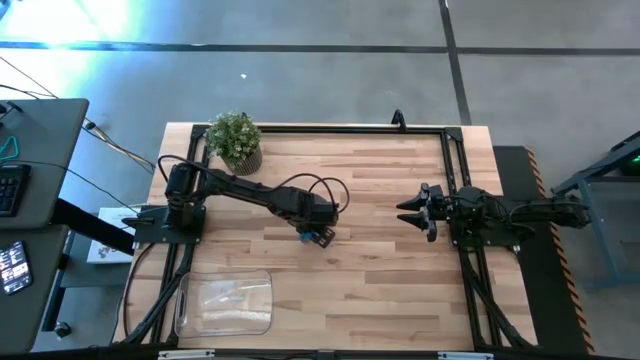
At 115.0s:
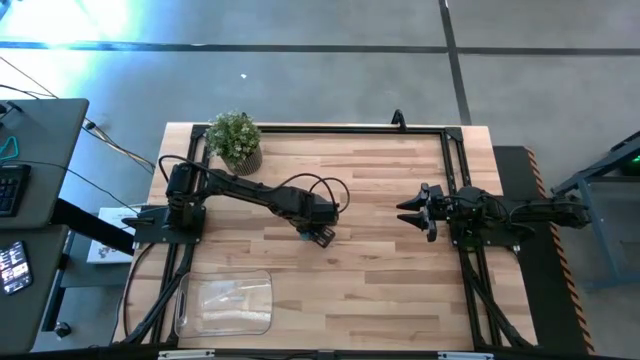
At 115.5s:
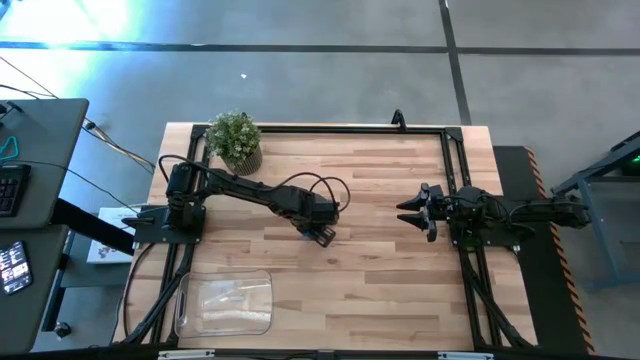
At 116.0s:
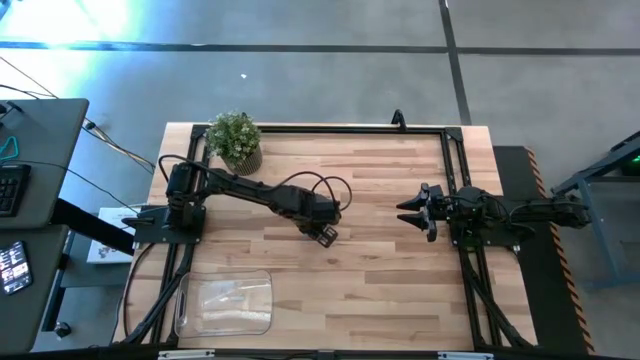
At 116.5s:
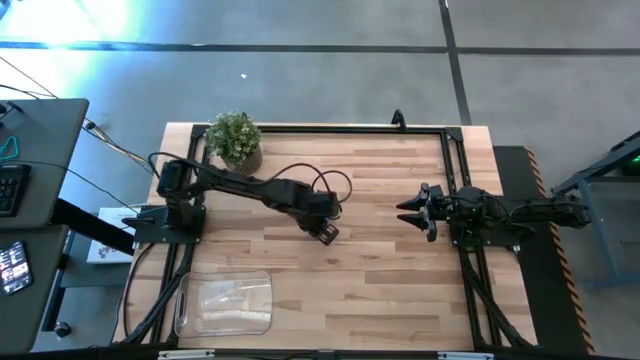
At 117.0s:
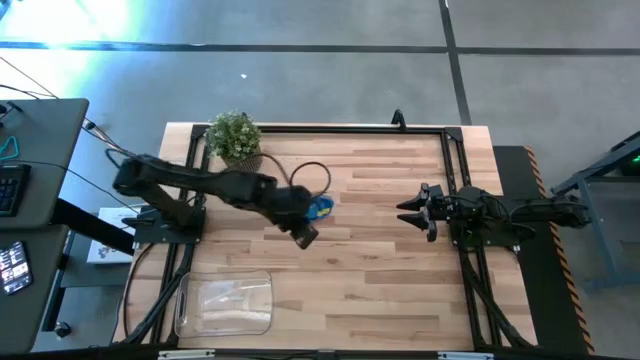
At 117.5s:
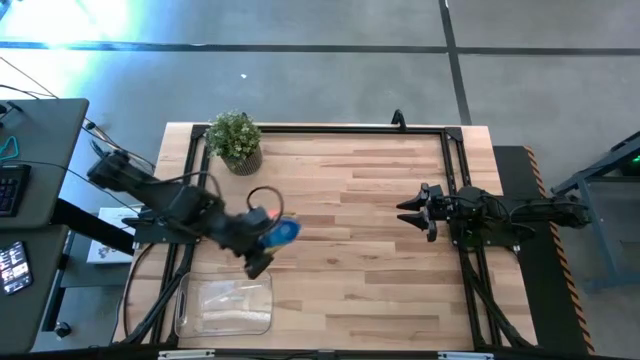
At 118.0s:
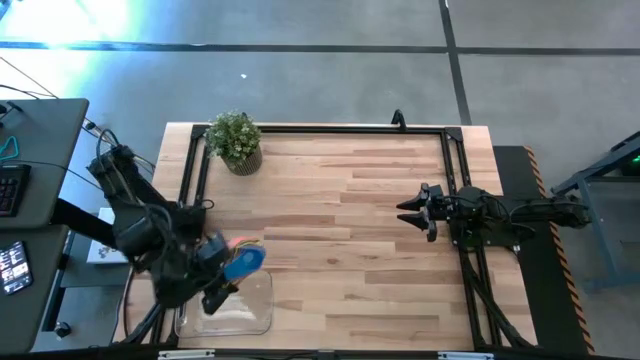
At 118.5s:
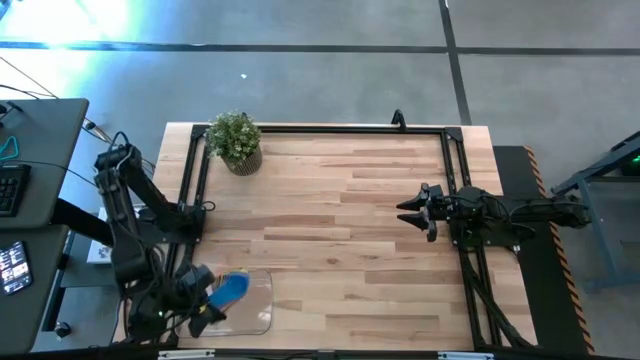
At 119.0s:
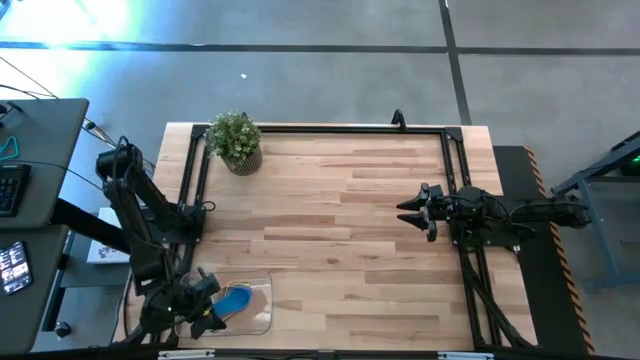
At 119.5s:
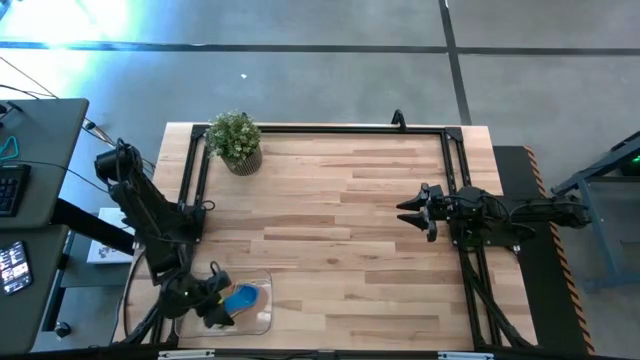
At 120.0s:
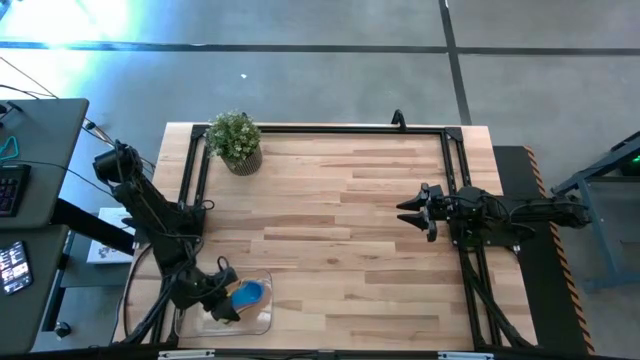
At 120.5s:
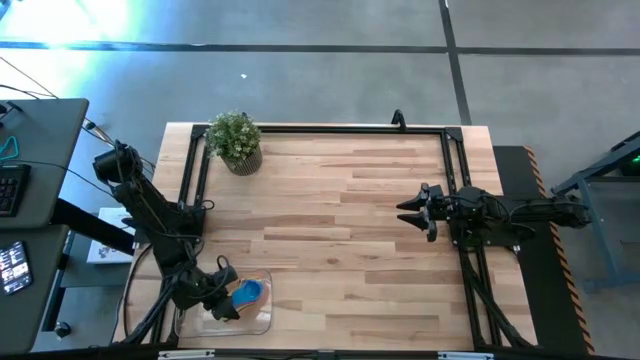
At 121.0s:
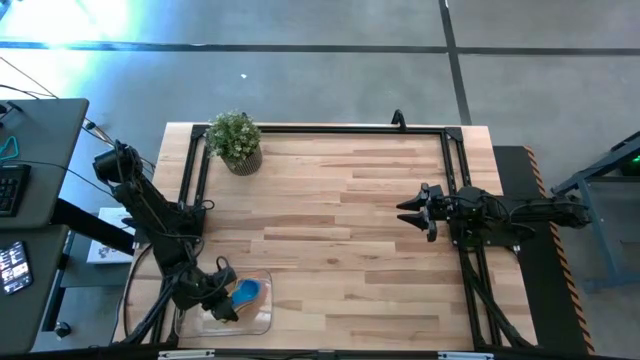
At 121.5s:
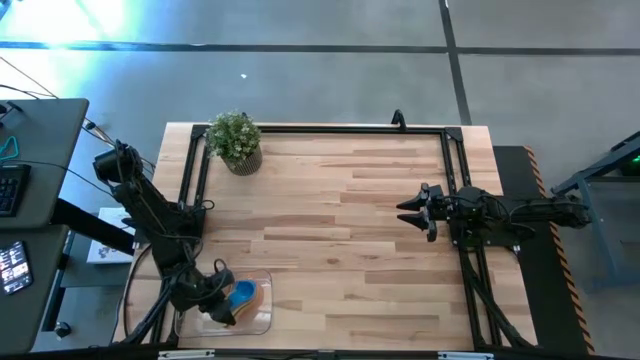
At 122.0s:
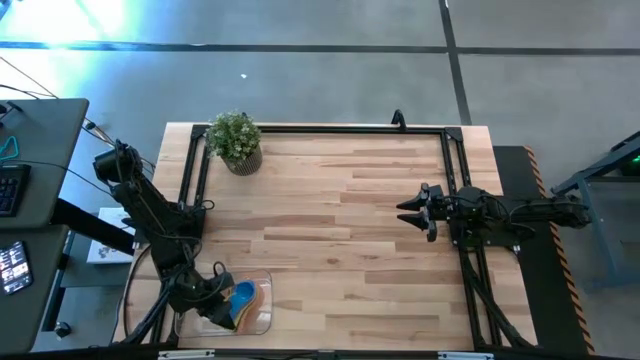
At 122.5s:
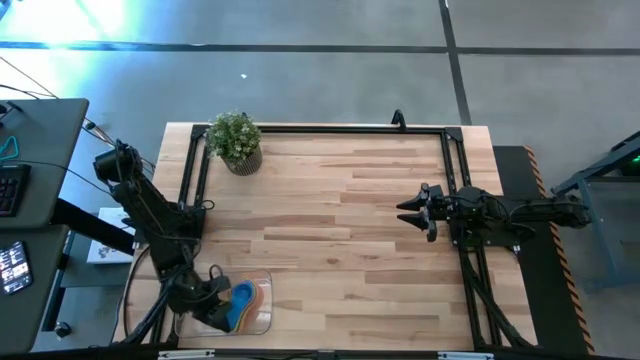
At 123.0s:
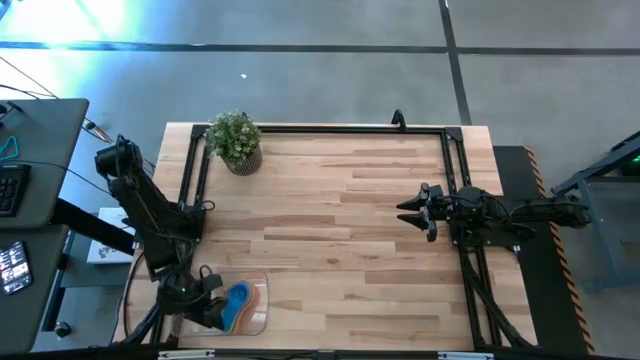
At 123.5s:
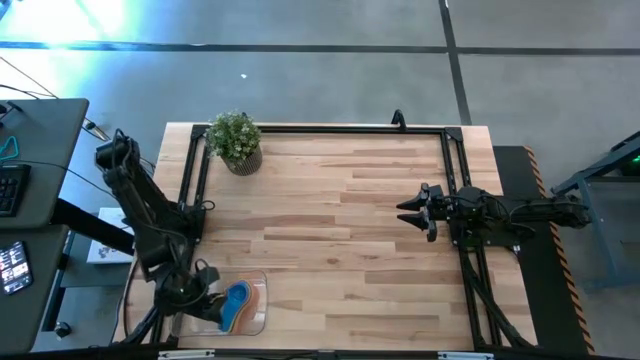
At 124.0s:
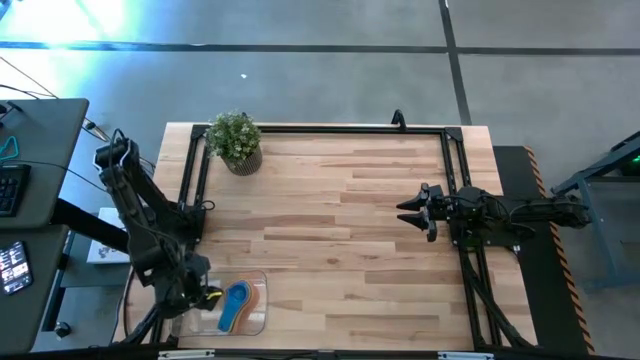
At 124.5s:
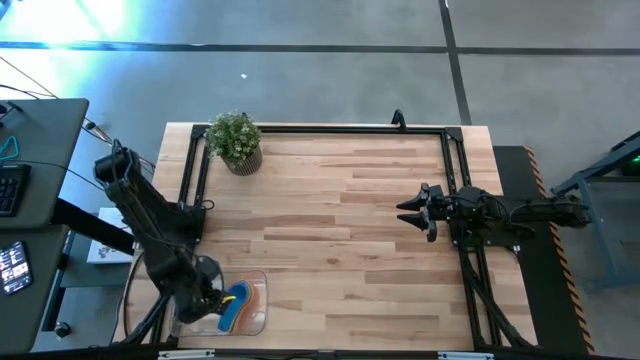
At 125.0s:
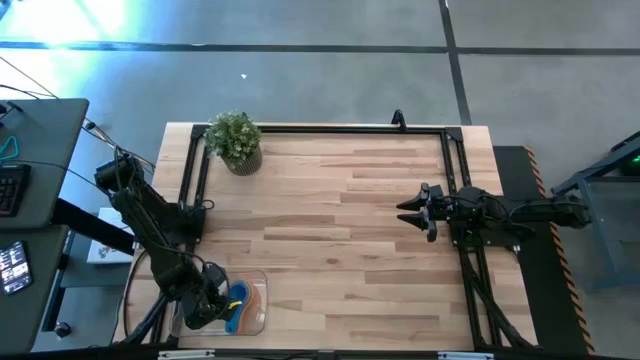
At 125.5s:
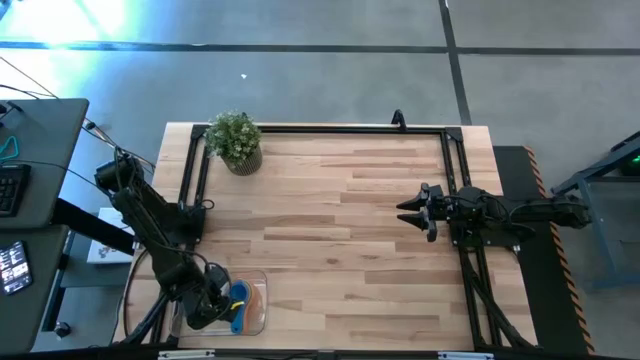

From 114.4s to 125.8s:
Task: Nest measuring cups in basket
Put the stacked measuring cups into the transparent bin

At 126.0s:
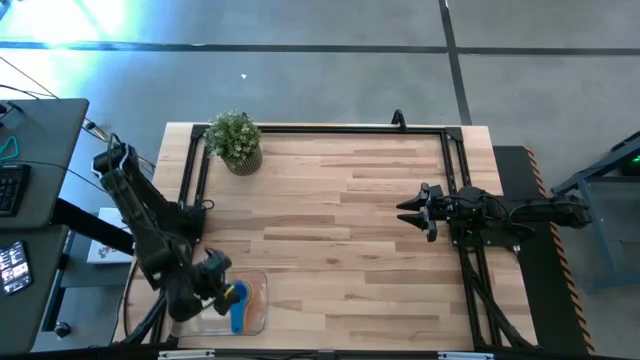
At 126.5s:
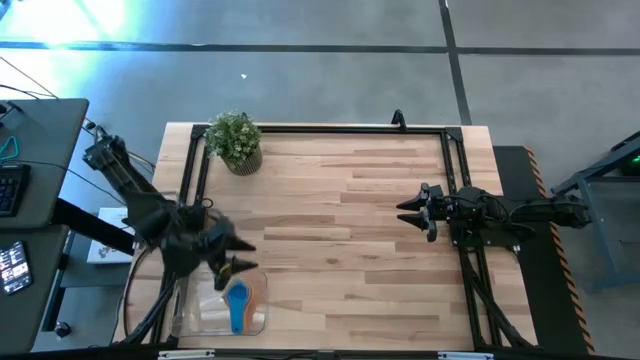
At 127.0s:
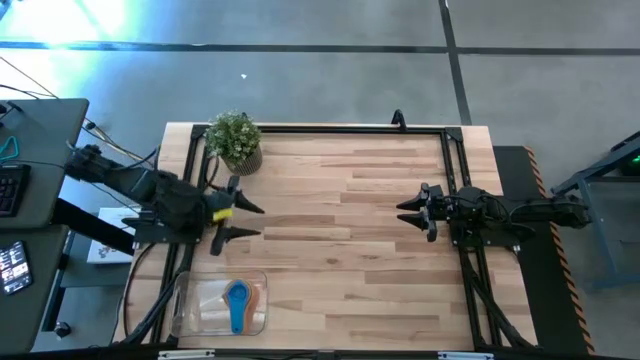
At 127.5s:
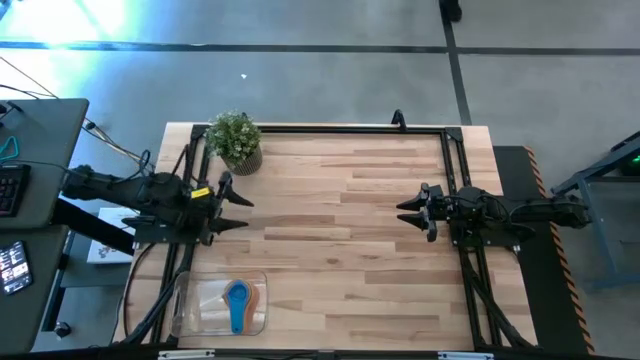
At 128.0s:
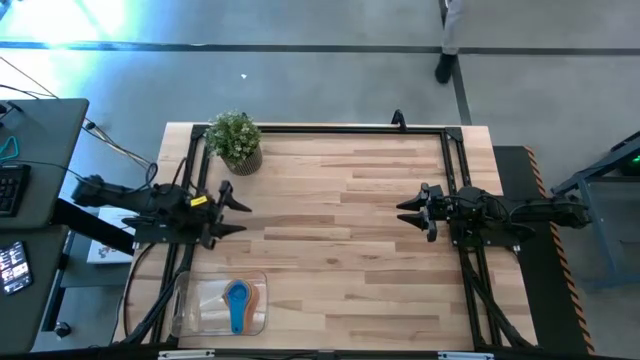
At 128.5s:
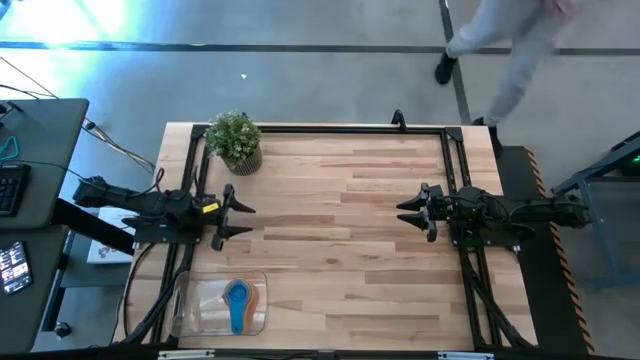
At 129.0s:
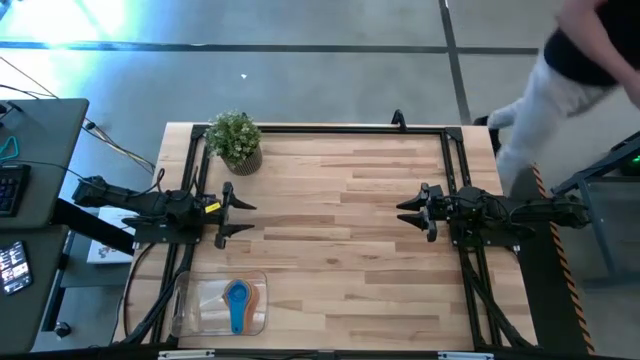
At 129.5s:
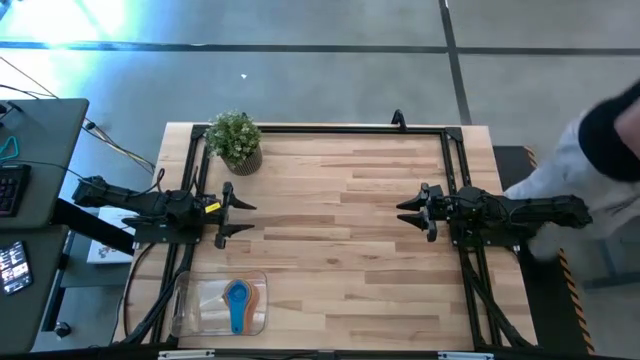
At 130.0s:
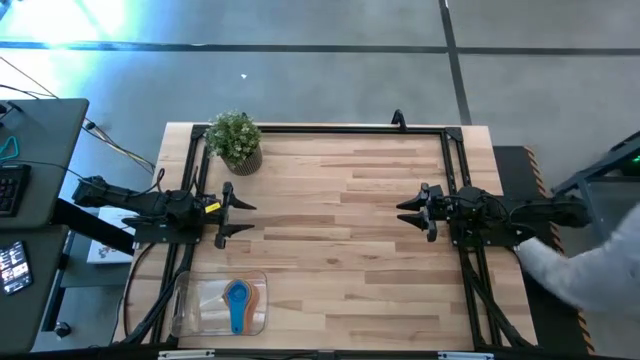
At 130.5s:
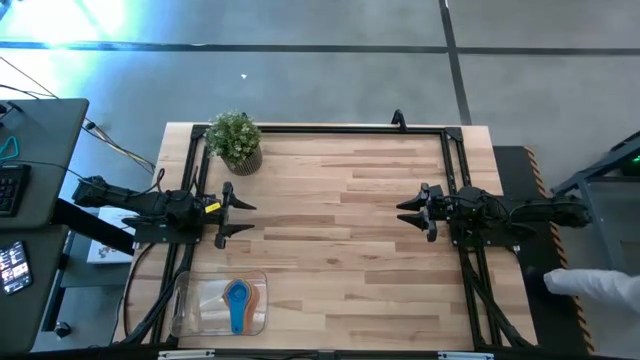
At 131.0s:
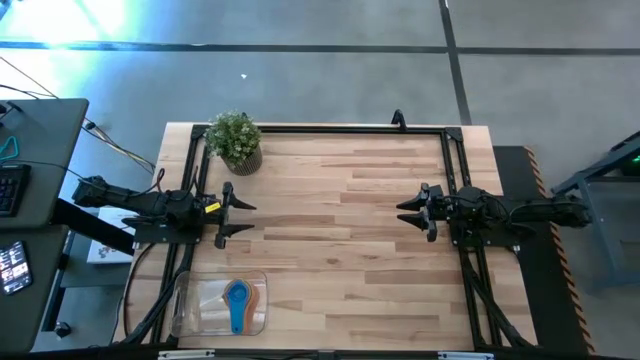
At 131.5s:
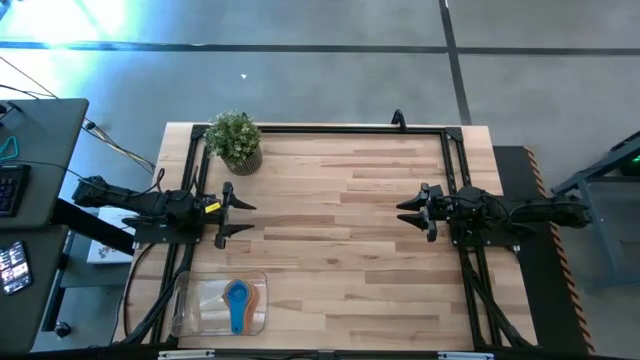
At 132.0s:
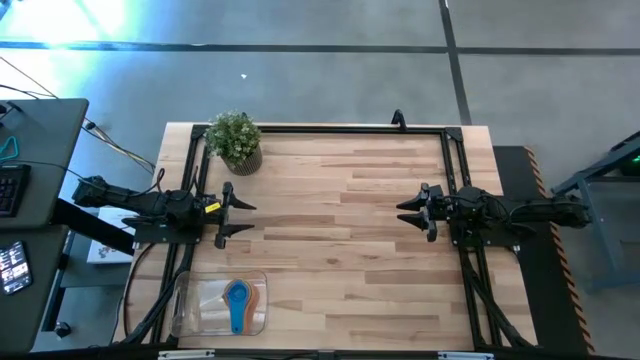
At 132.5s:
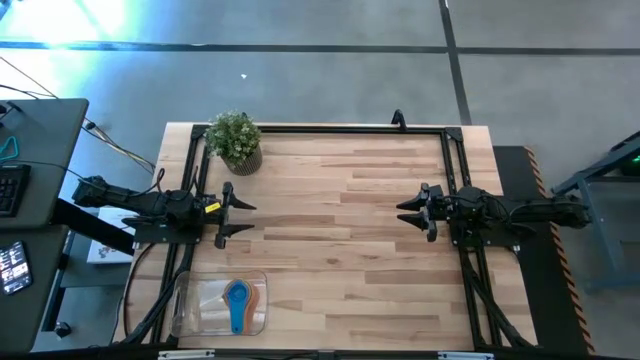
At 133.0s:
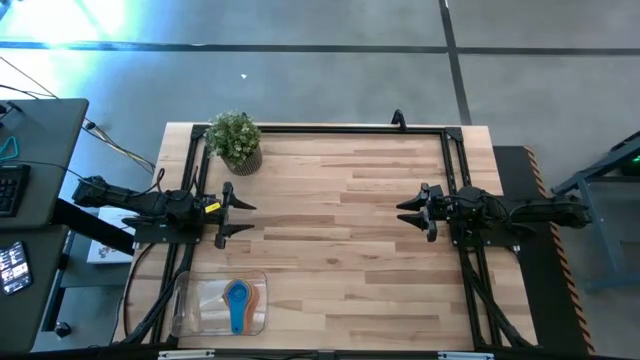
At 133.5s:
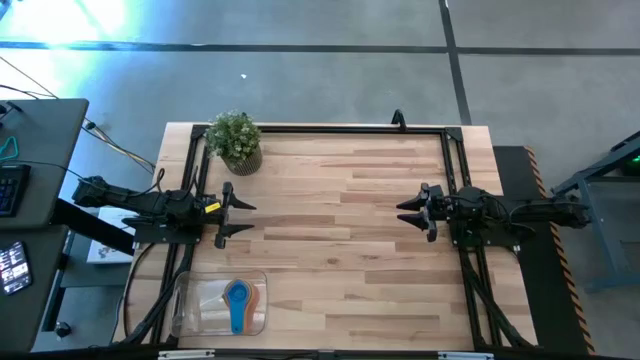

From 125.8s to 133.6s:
Return to Home Position
